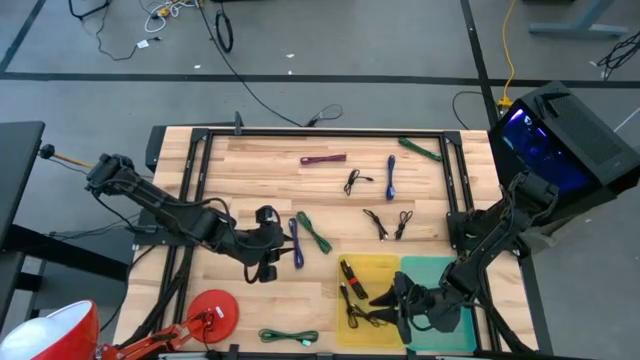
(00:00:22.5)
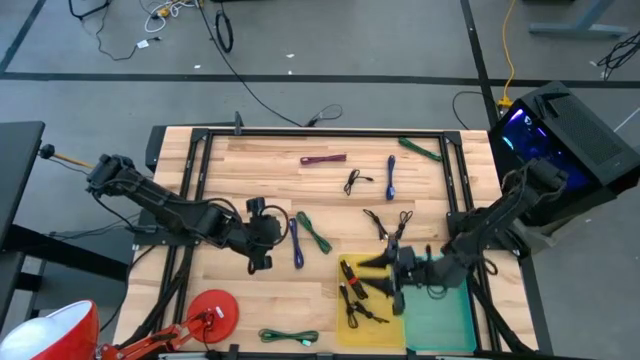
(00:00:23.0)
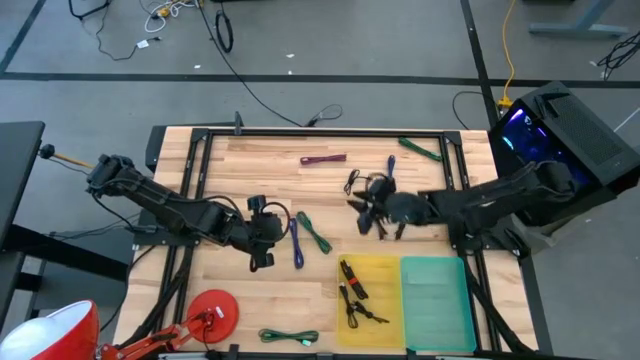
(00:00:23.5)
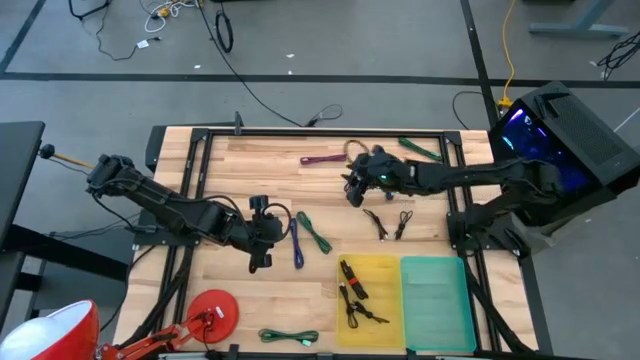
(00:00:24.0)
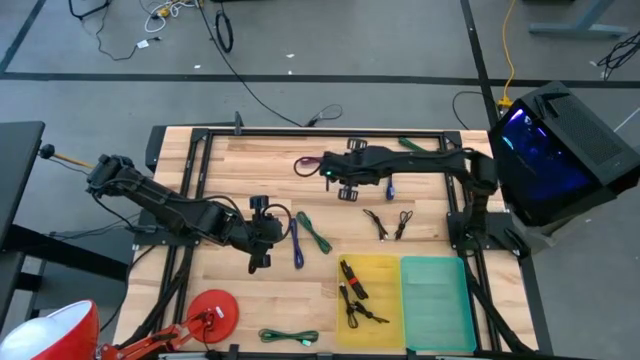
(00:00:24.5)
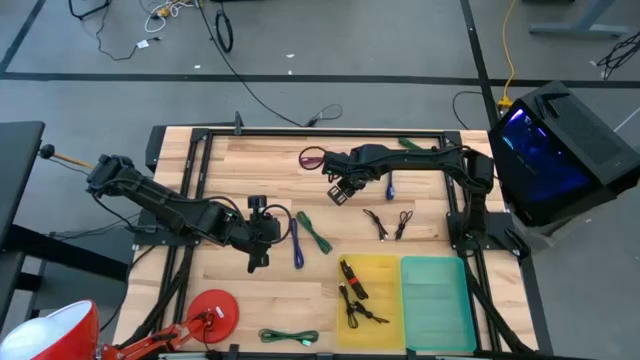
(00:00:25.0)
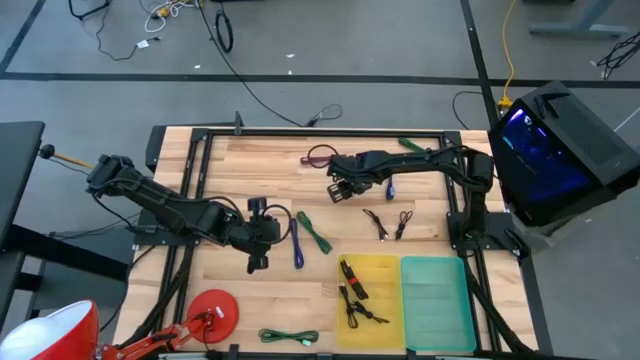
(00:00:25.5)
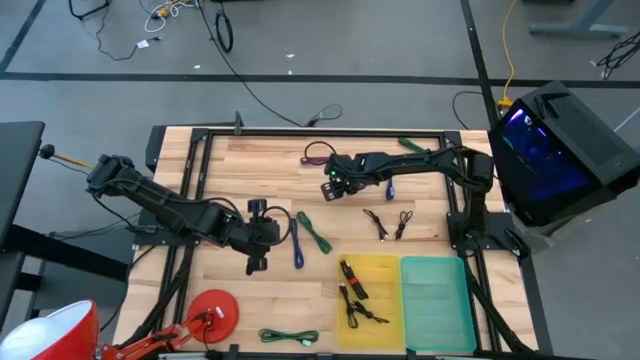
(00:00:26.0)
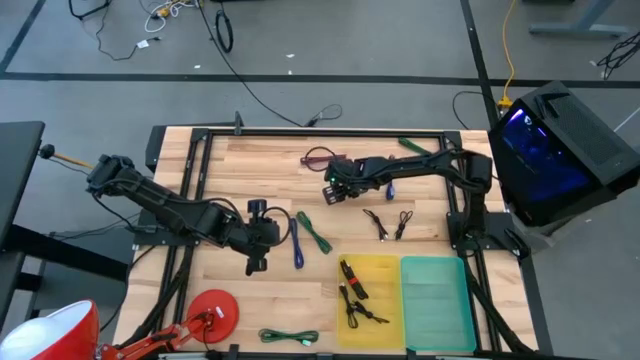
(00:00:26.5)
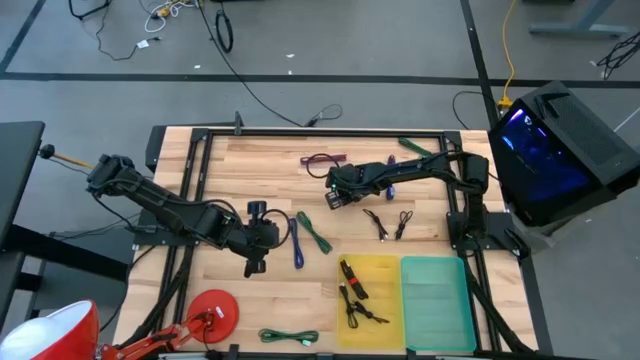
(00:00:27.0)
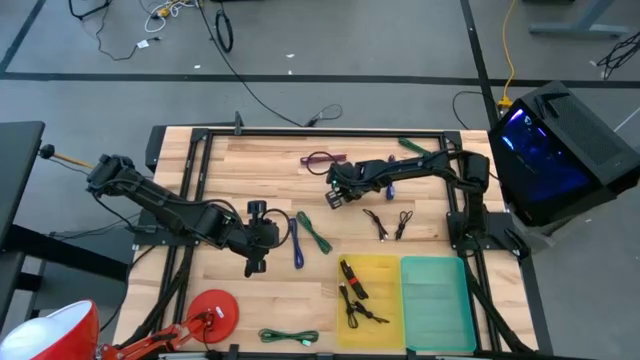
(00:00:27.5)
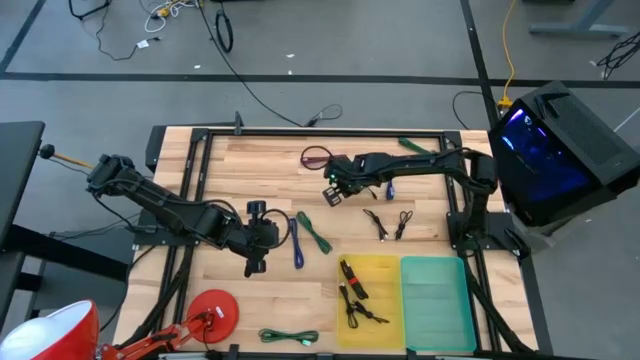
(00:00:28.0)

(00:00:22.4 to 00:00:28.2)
Task: Pick & Place USB Port
Put the black charger cable into the yellow bin

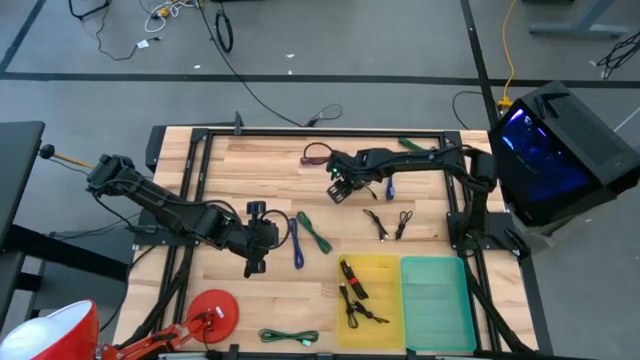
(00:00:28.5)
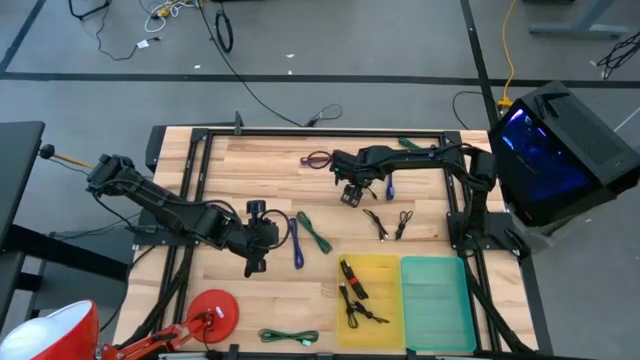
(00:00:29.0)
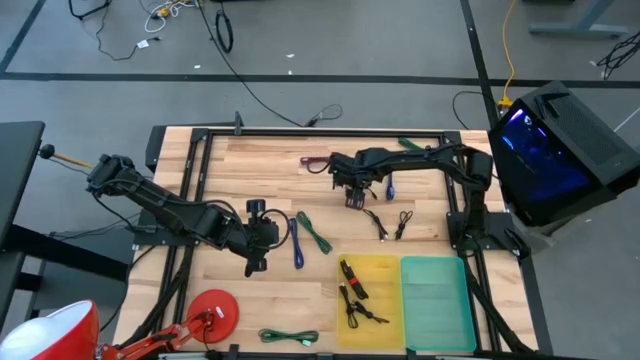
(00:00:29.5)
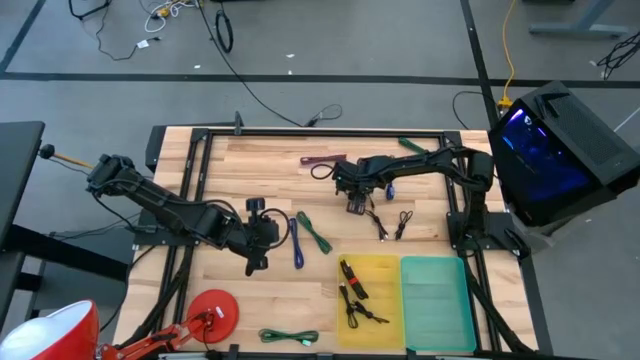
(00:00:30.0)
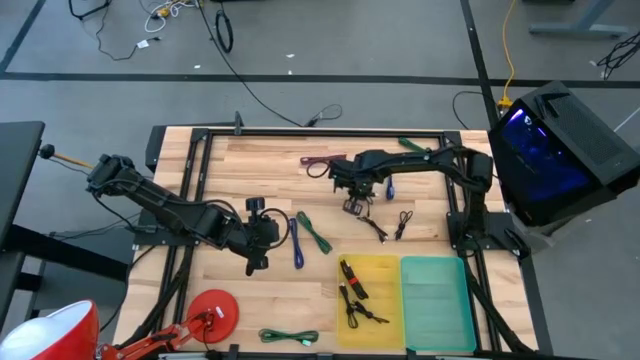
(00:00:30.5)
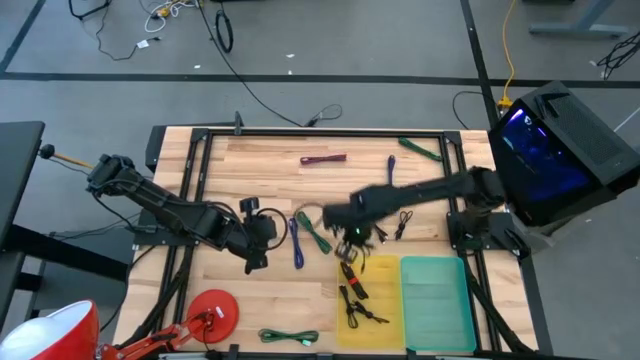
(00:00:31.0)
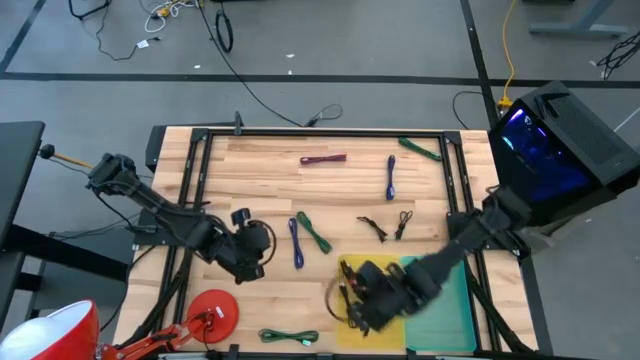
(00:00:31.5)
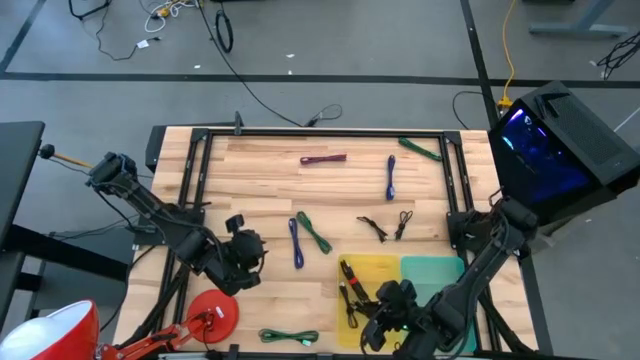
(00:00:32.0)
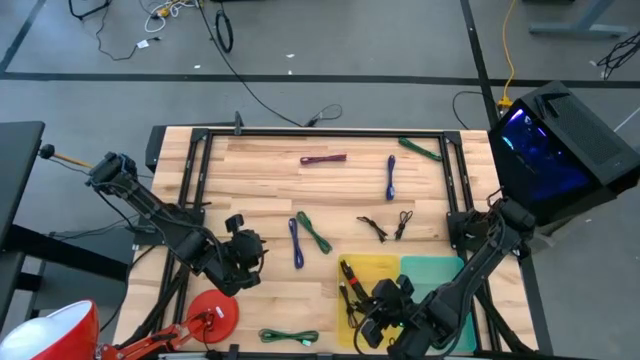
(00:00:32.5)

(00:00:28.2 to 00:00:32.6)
Put the black charger cable into the yellow bin

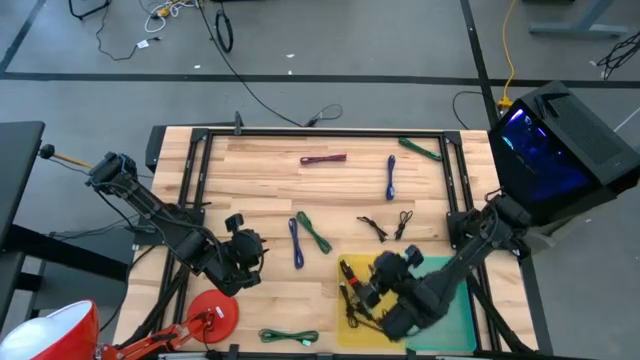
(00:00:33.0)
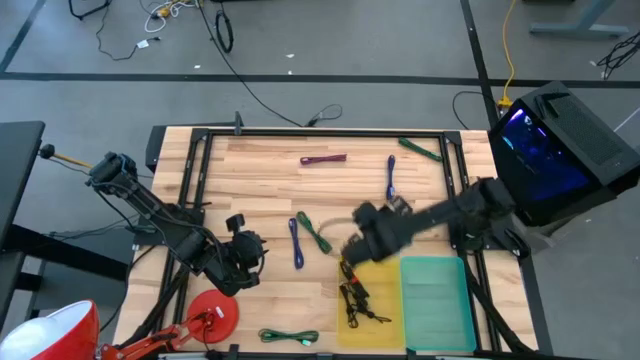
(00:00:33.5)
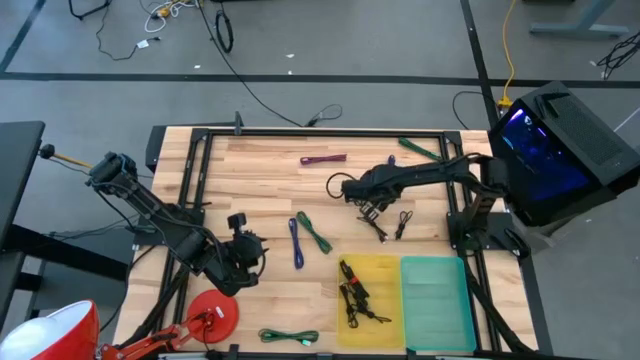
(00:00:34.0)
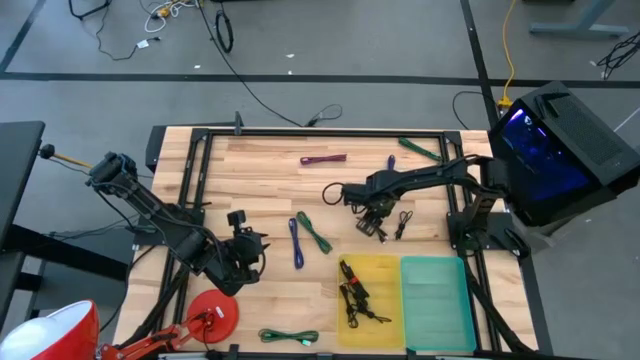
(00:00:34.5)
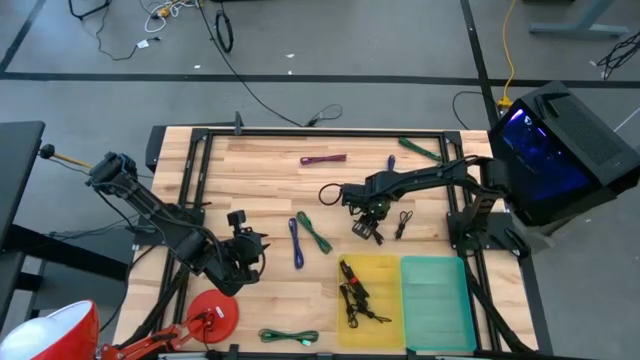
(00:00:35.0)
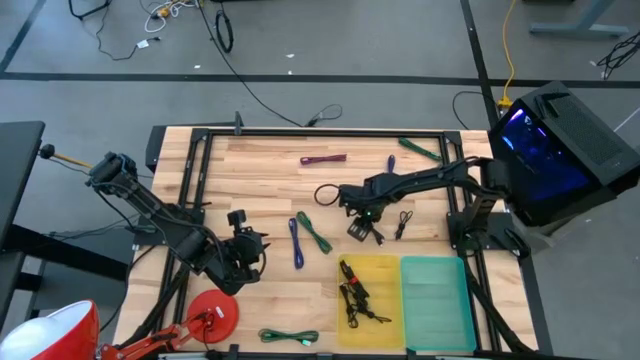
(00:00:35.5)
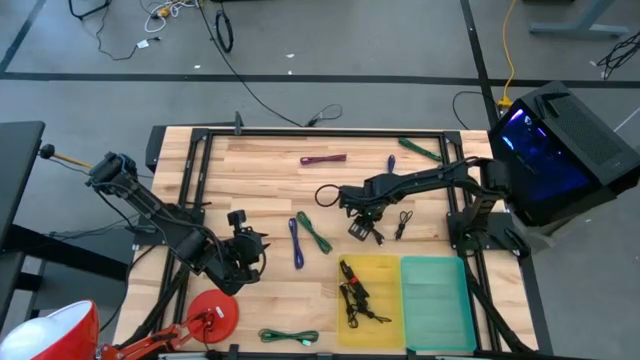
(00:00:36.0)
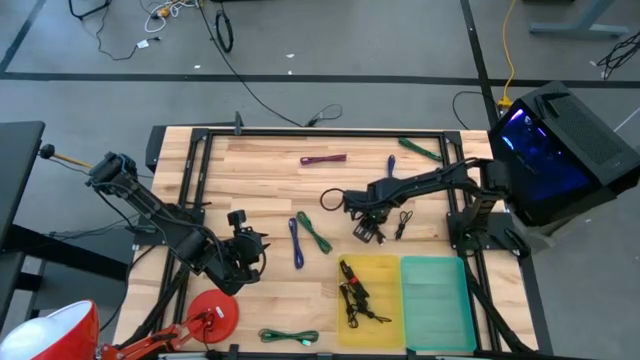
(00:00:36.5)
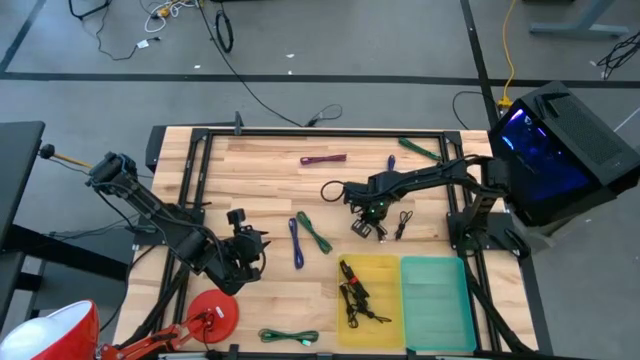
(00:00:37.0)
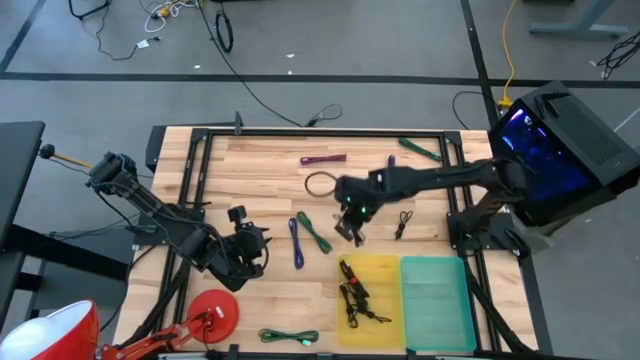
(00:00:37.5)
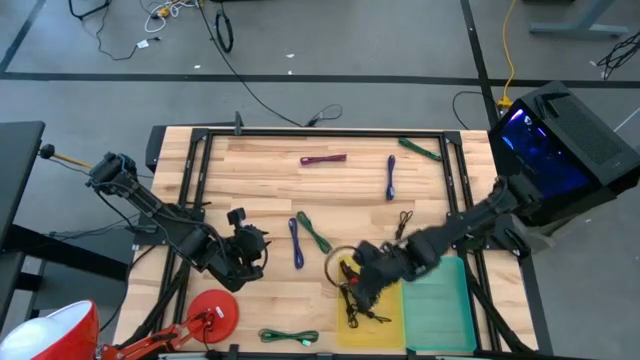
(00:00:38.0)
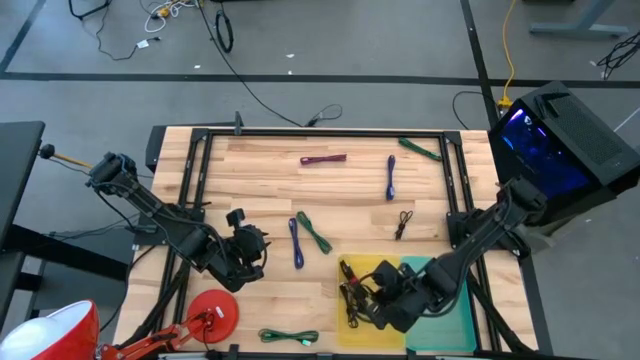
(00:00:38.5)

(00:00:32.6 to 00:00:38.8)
Put the black charger cable into the yellow bin

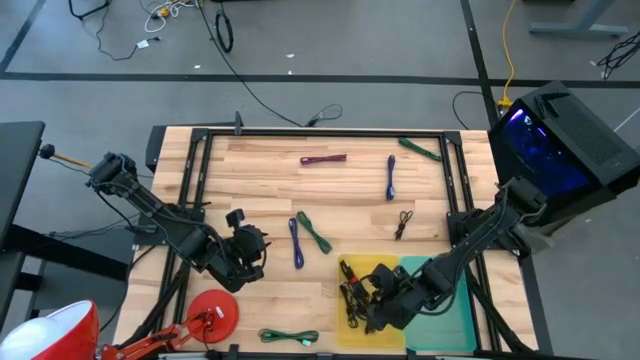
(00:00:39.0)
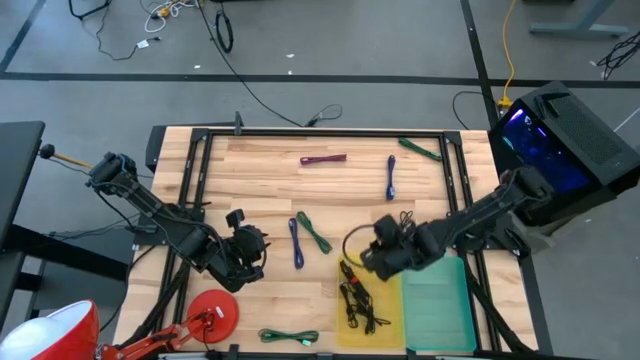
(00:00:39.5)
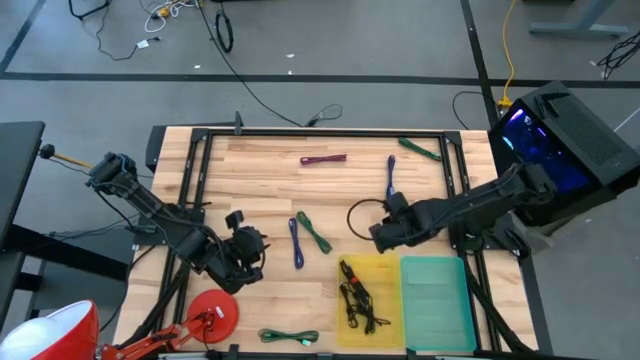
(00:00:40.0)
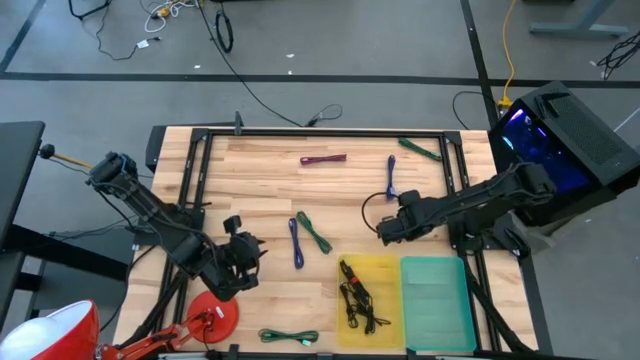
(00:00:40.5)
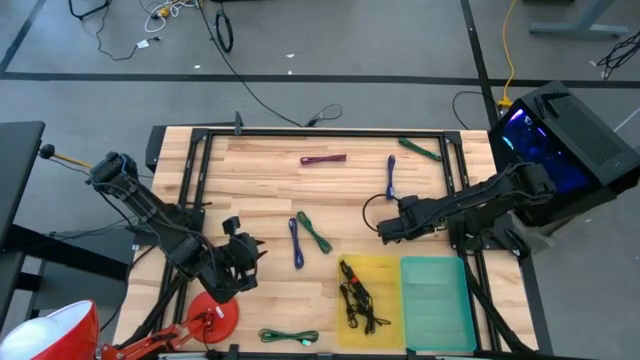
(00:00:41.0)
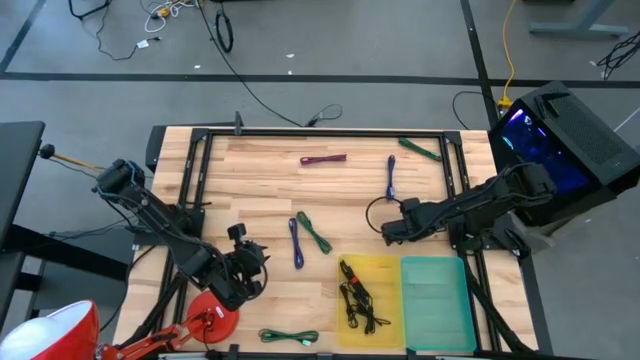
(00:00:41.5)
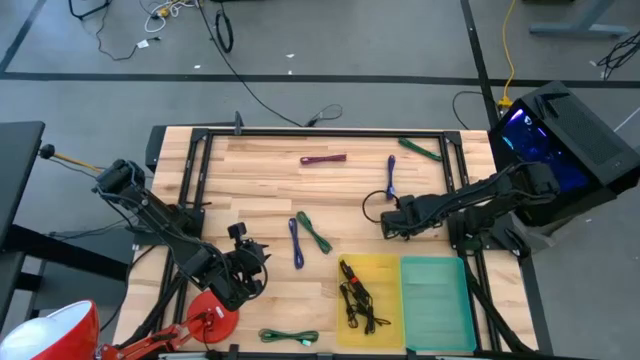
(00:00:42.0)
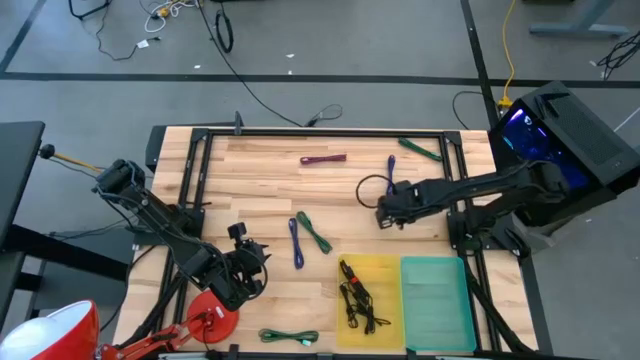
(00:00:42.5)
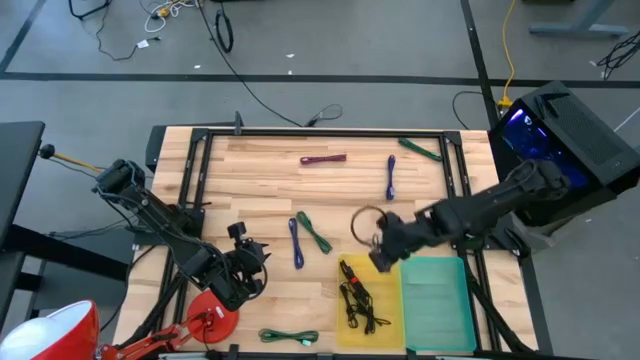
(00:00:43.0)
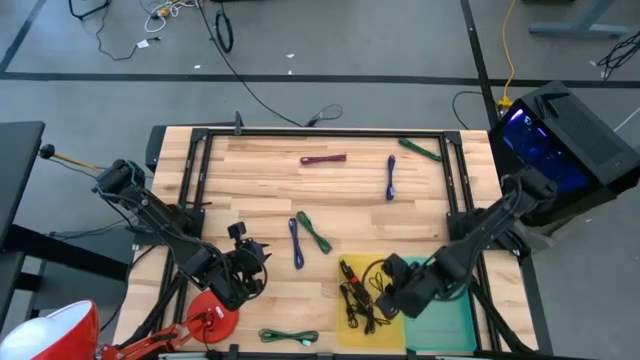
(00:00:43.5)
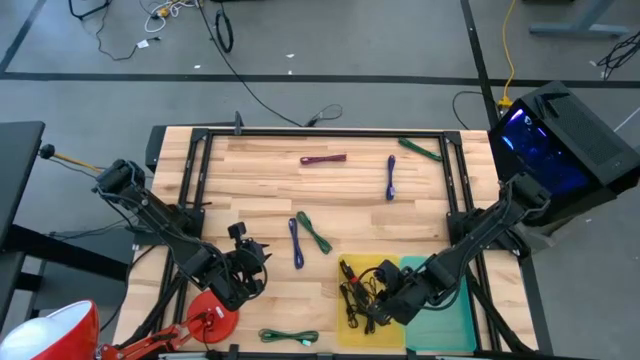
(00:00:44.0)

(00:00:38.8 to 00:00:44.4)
Put the black charger cable into the yellow bin
